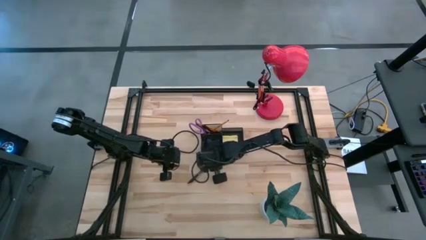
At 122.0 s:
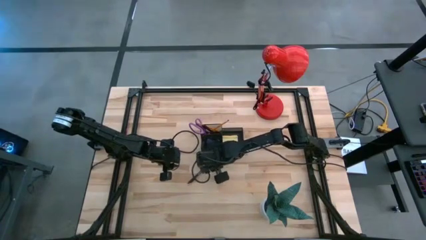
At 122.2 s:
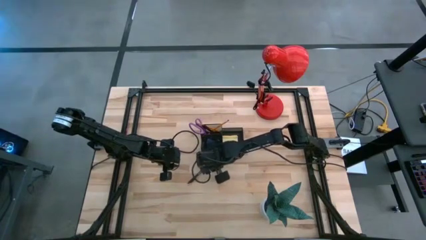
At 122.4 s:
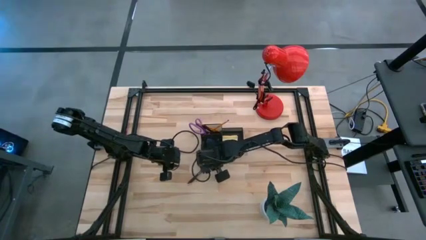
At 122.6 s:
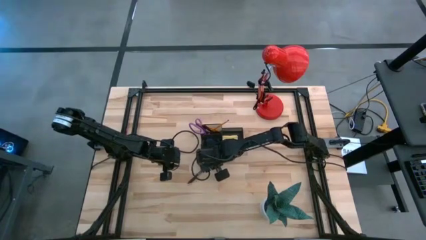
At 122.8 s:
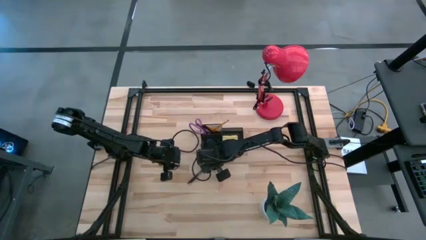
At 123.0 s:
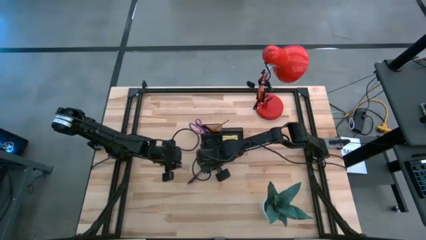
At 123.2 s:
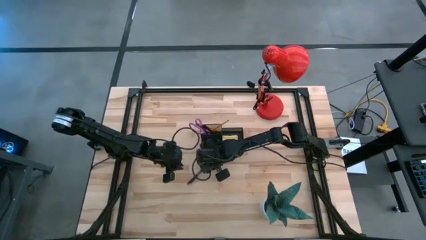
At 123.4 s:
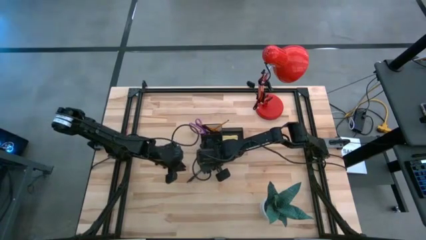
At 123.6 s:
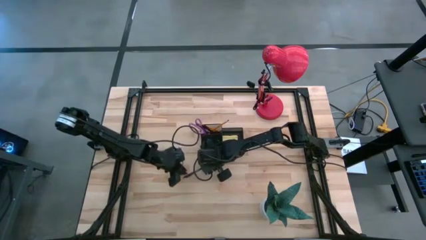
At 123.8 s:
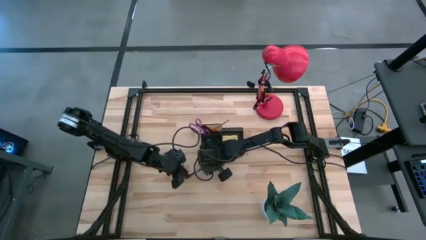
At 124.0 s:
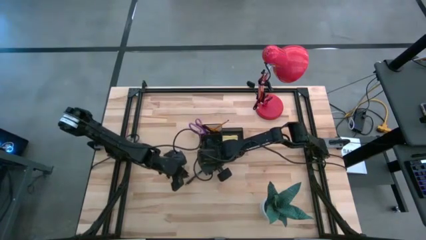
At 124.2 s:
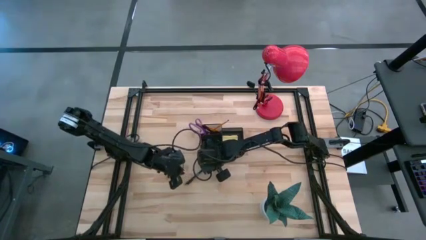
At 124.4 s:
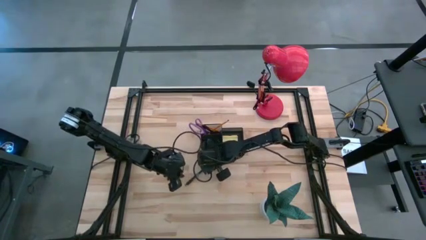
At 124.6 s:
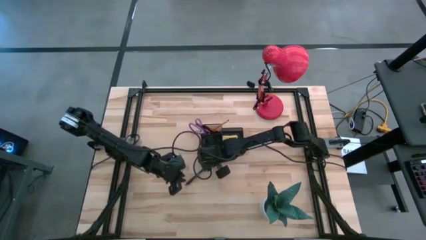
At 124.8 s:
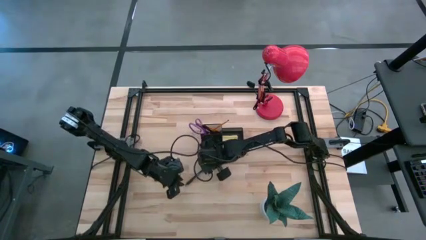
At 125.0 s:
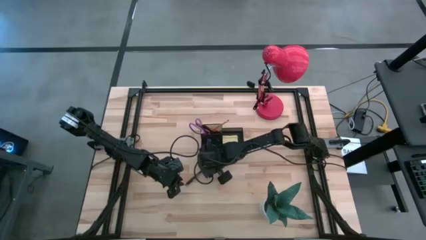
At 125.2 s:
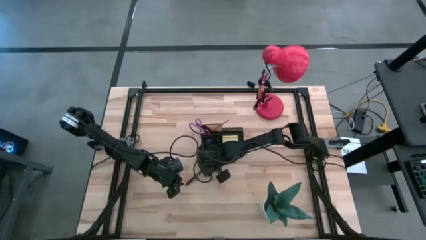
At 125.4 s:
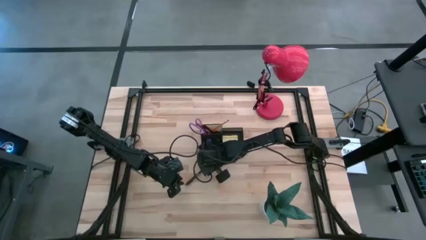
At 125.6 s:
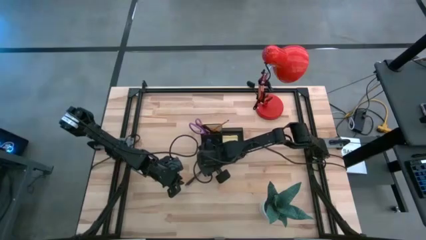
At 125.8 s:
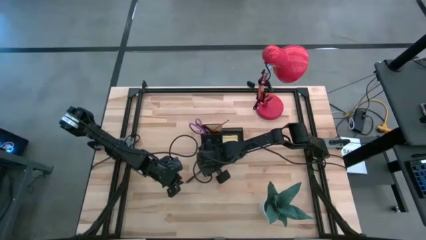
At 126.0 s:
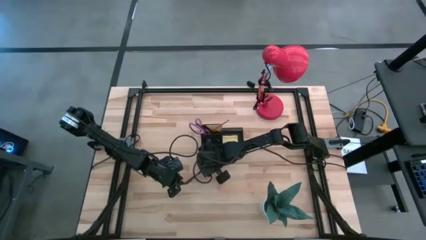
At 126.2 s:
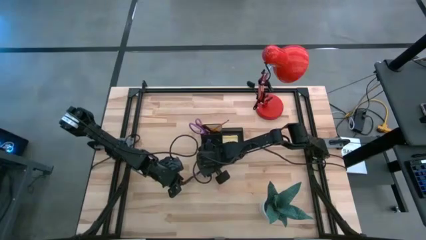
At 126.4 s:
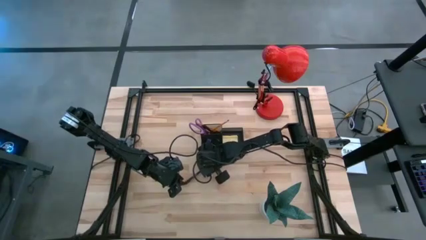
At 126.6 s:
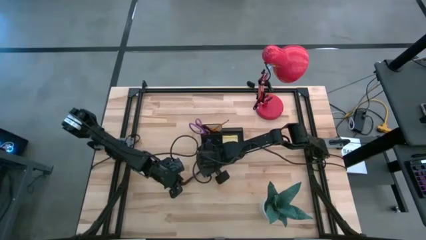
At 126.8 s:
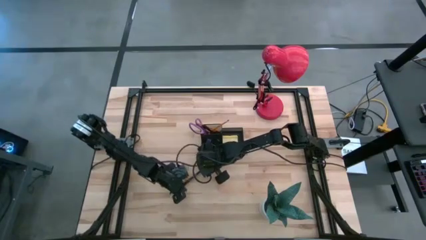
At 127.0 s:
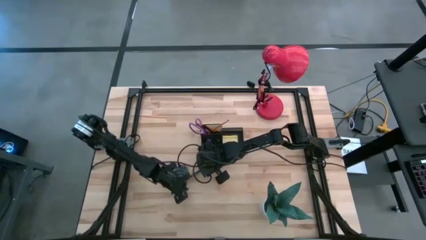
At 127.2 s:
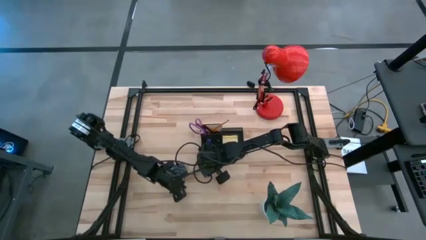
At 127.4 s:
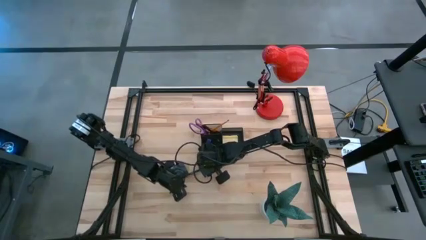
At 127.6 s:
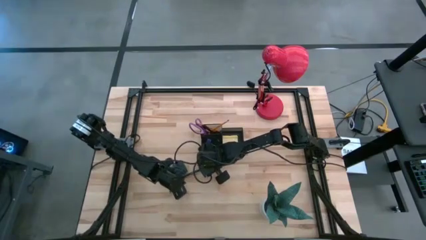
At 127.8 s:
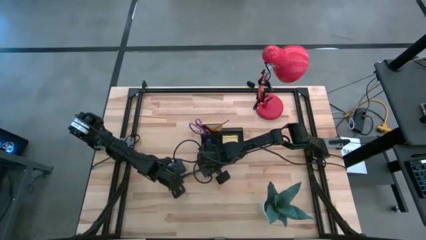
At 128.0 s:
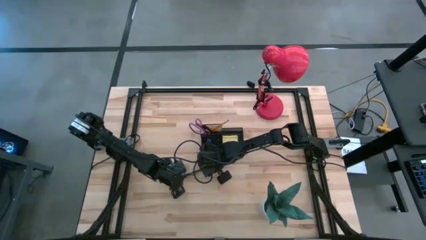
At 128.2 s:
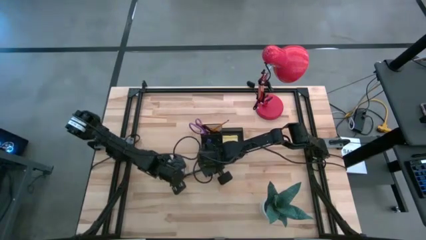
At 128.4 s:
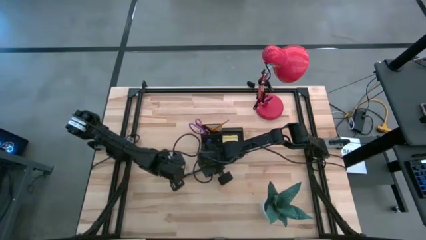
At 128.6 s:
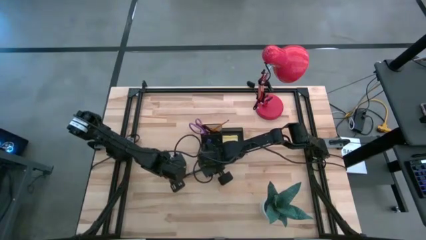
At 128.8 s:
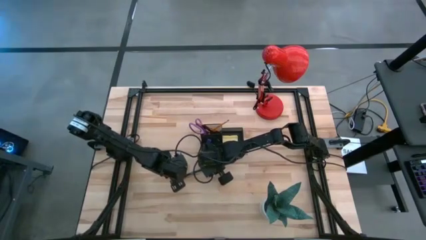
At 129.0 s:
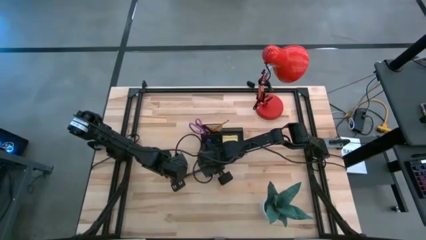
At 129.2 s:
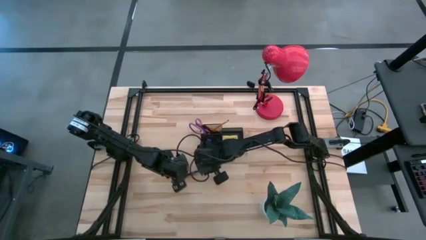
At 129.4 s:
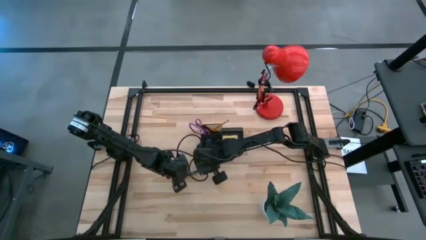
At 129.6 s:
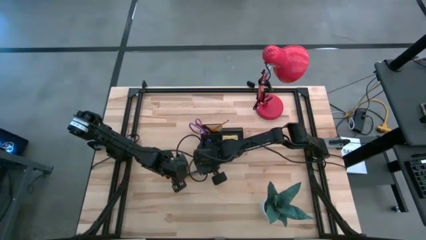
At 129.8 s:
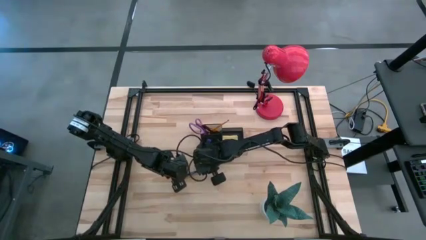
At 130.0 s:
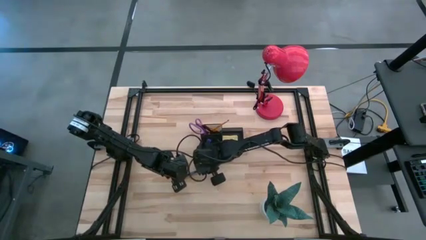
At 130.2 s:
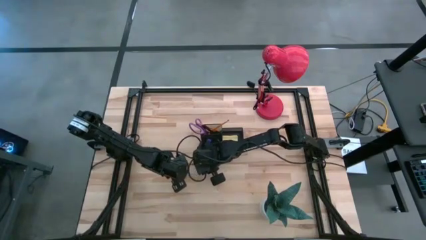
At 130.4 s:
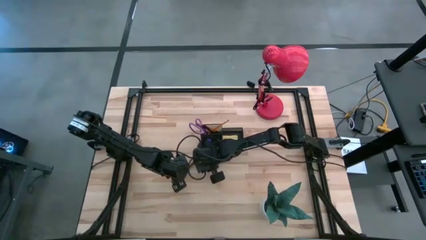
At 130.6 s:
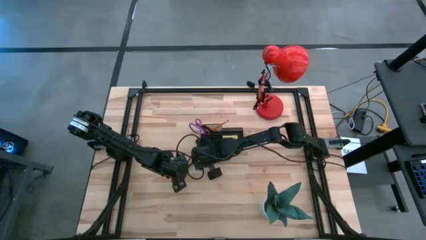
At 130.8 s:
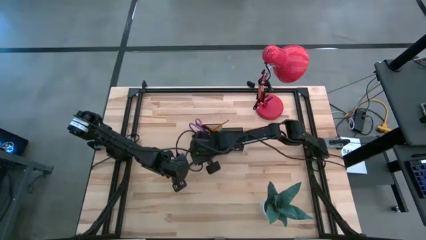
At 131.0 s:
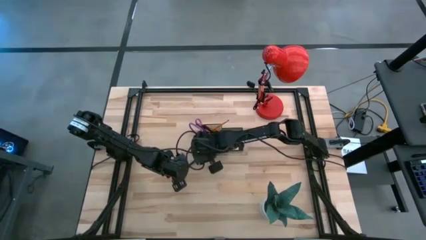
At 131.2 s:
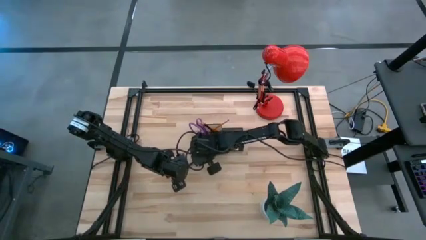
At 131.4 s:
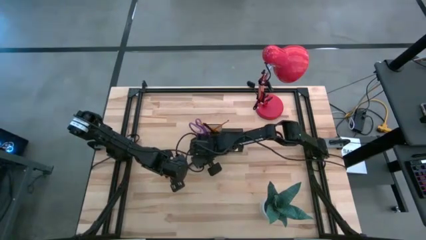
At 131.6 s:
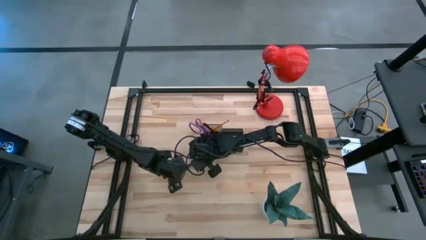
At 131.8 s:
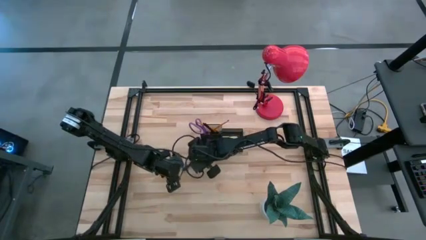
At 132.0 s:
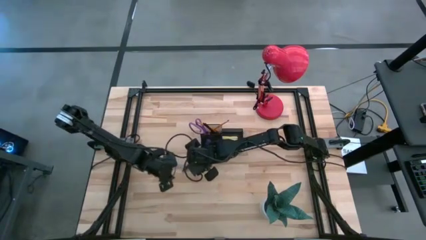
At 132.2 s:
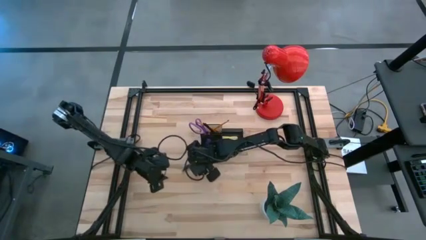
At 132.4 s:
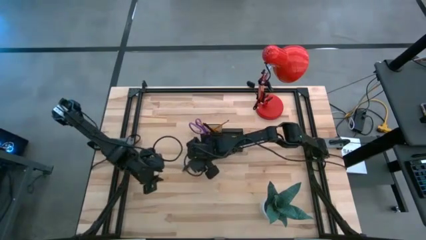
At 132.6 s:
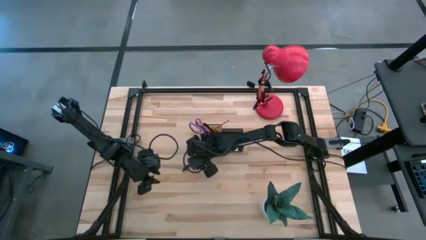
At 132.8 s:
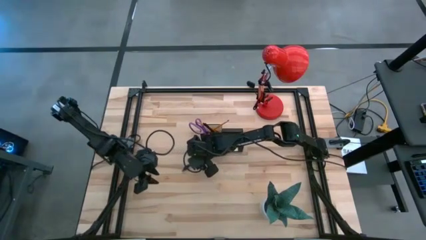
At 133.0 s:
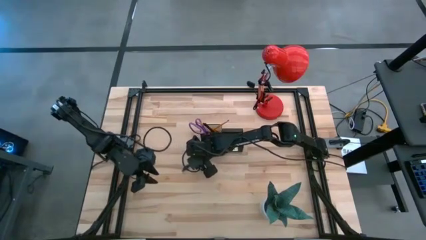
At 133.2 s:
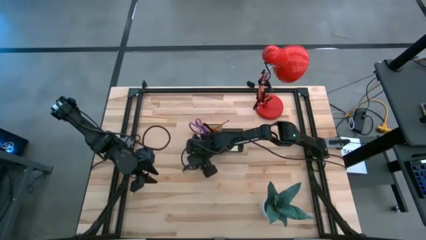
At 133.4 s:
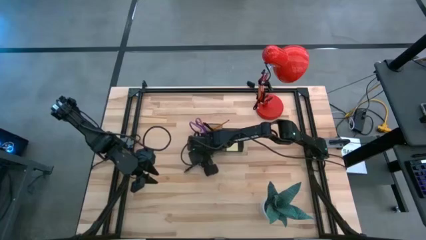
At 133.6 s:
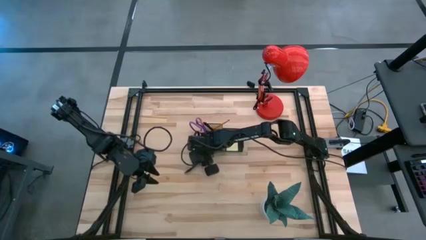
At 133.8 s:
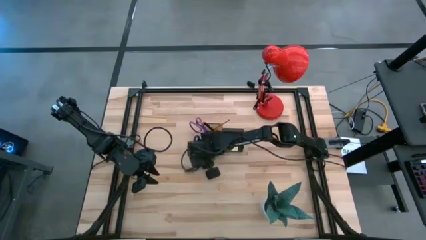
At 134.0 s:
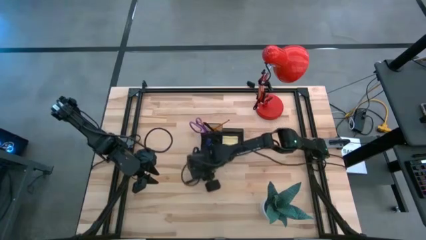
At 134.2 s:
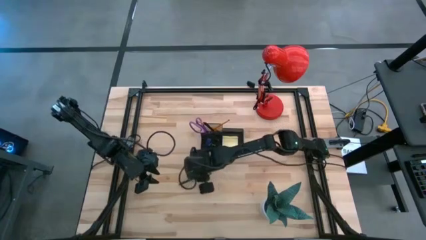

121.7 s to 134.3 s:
Task: Pick and place office supplies into organizer
Put the black pen into the black desk organizer

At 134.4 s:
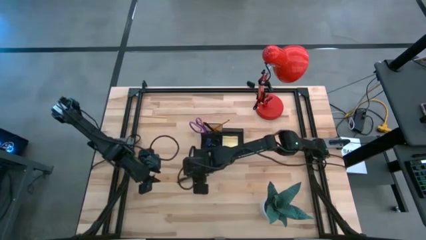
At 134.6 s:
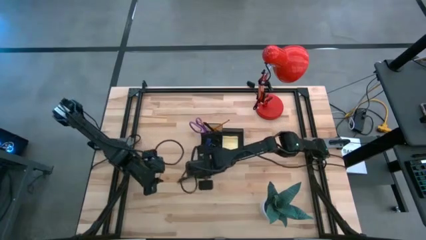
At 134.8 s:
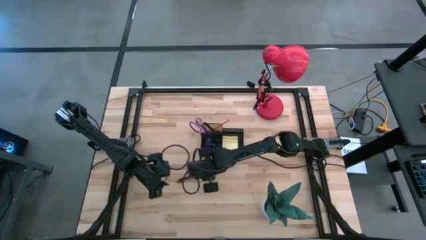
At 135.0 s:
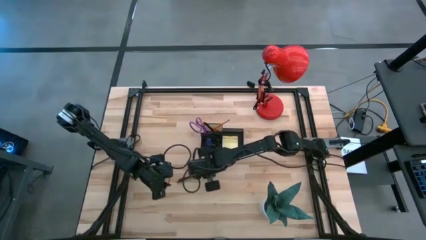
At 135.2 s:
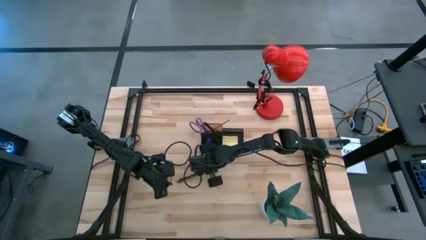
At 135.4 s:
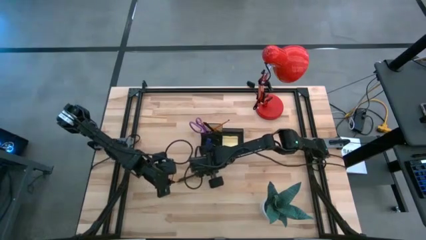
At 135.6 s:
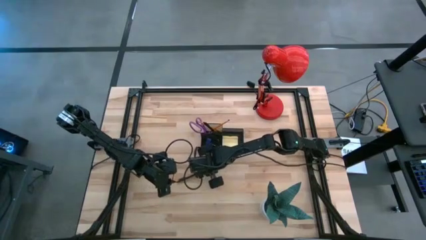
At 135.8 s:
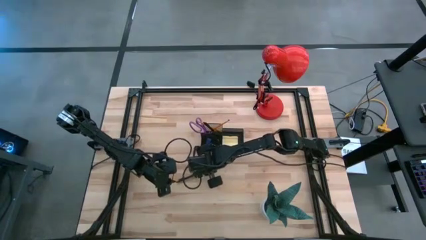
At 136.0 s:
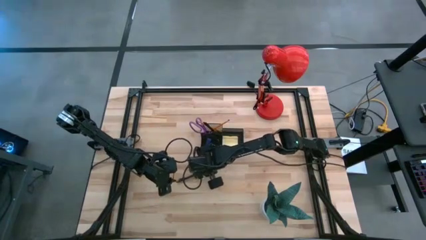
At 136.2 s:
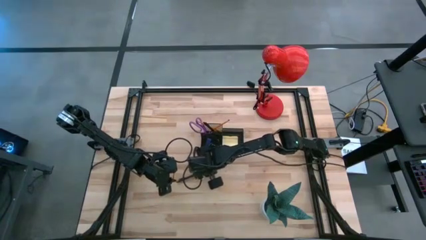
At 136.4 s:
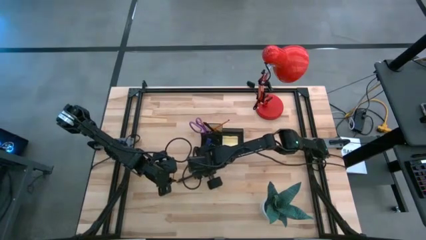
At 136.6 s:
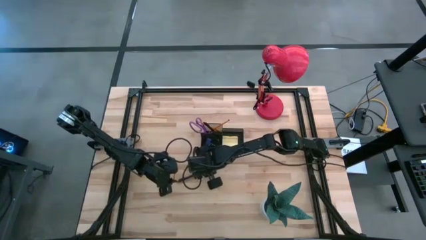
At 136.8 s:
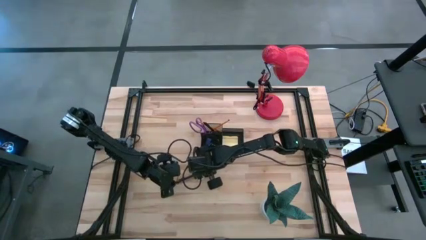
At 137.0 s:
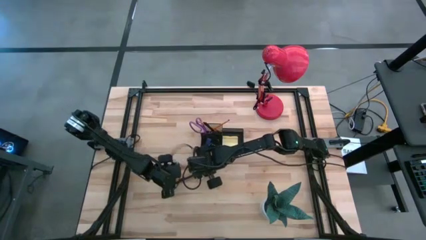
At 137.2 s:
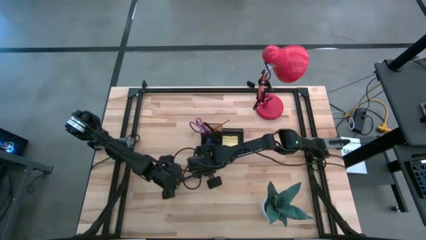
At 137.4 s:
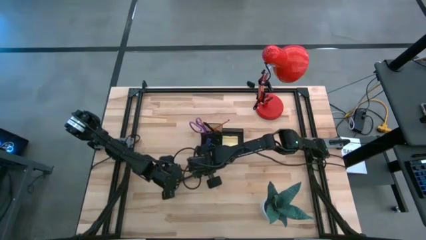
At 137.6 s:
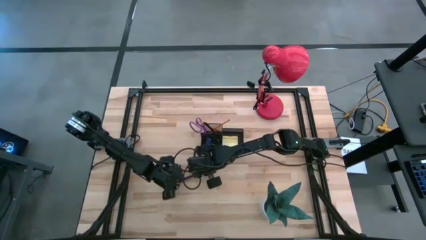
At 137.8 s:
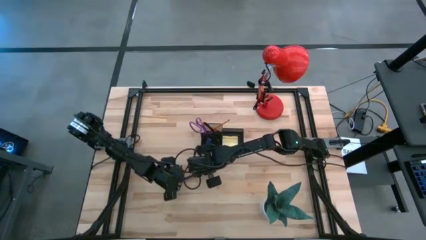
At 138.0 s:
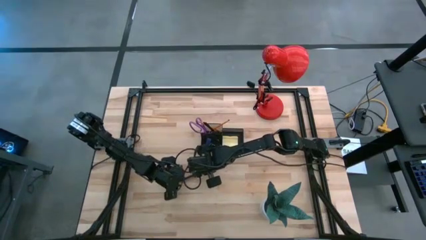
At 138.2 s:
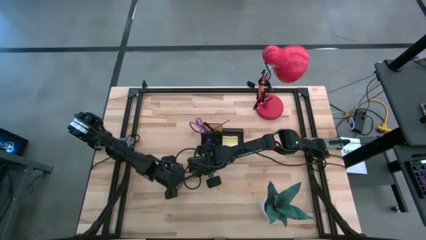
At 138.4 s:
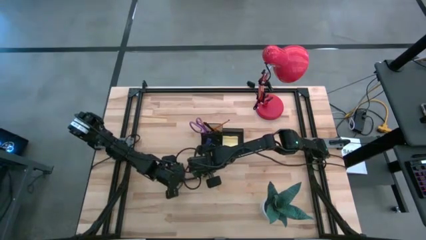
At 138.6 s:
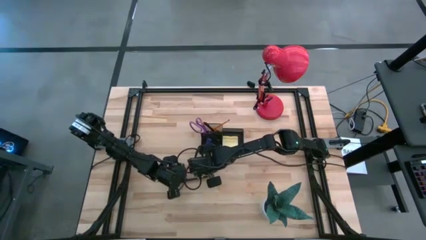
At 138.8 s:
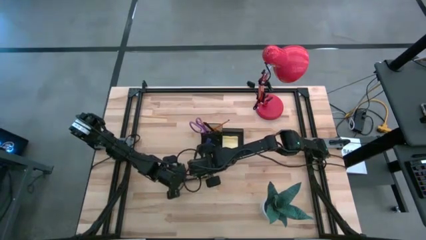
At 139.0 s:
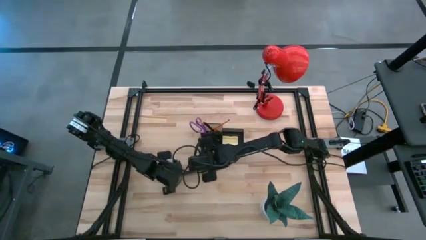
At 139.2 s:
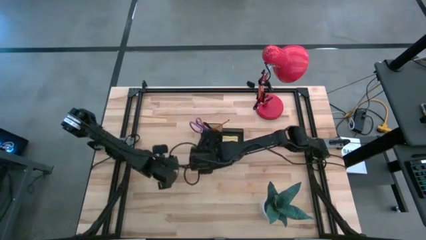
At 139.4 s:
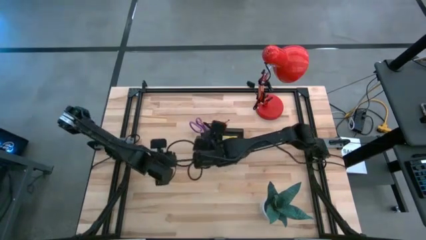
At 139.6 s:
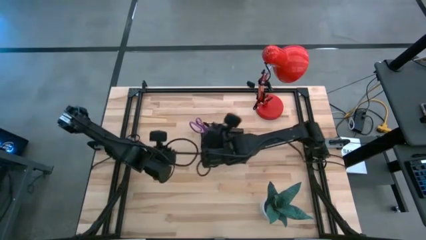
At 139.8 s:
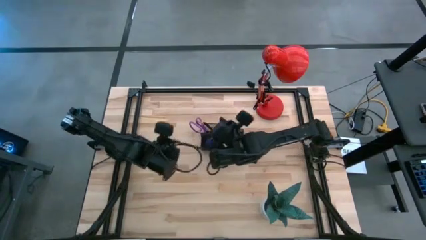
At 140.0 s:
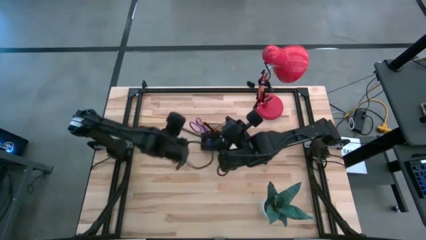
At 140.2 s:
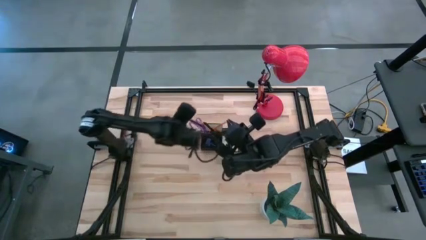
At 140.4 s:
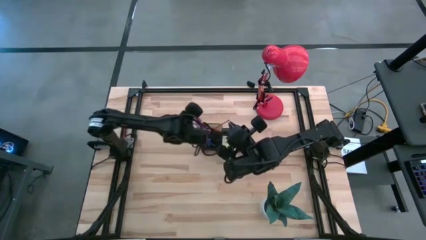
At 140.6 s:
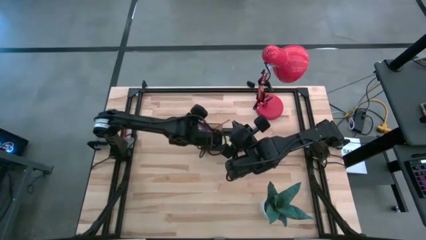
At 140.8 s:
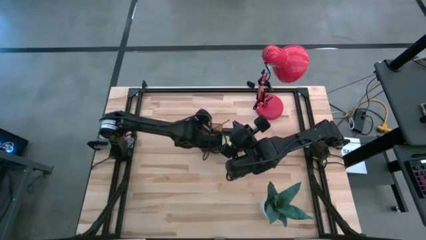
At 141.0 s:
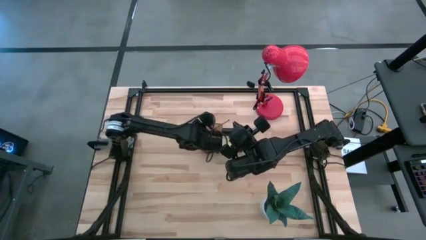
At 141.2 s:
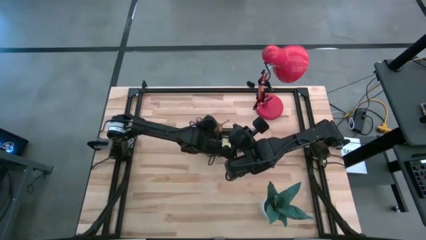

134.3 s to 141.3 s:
Put the black pen into the black desk organizer
